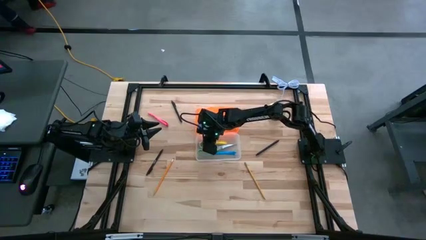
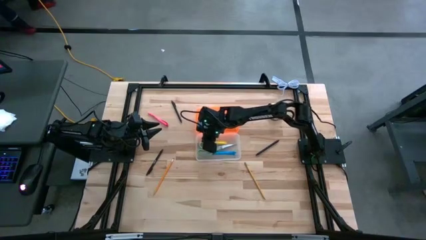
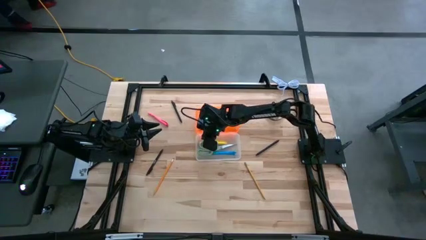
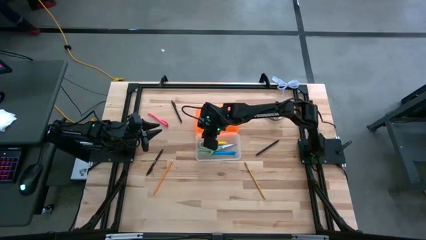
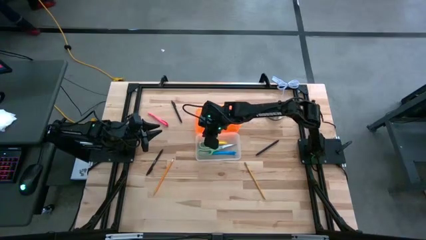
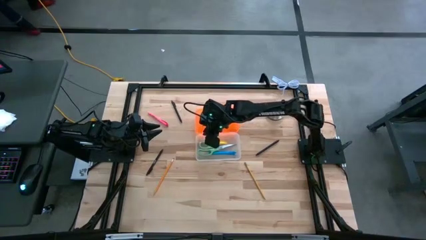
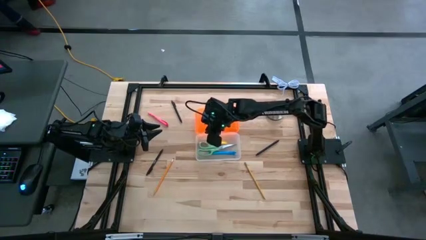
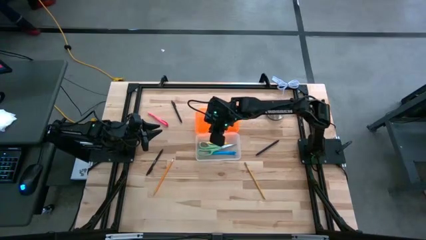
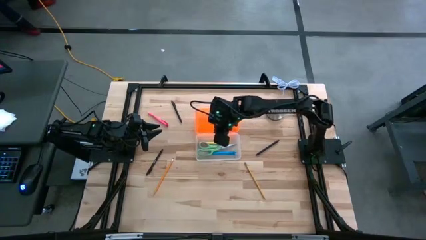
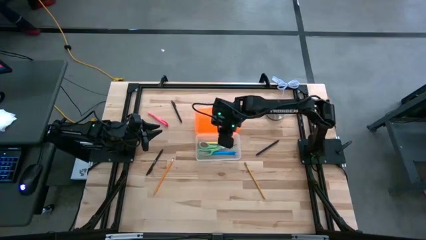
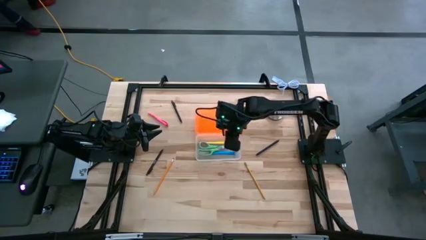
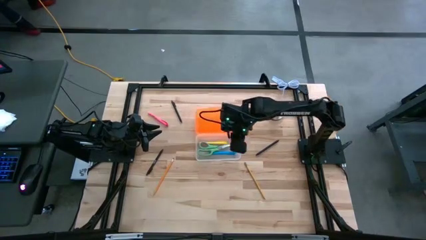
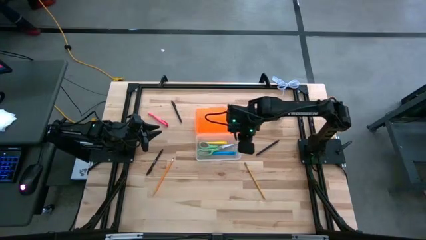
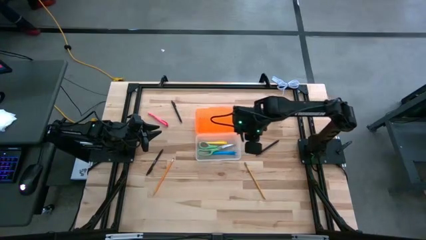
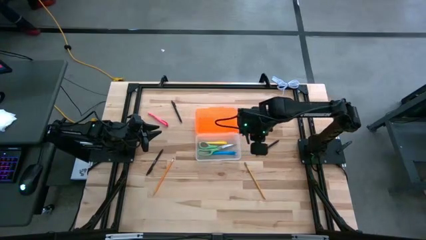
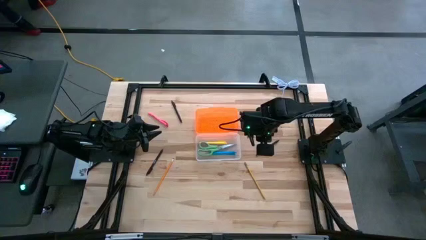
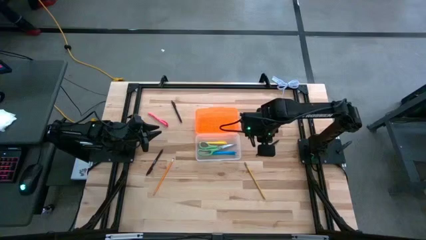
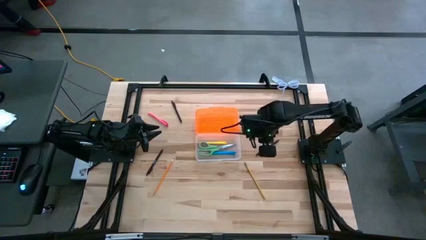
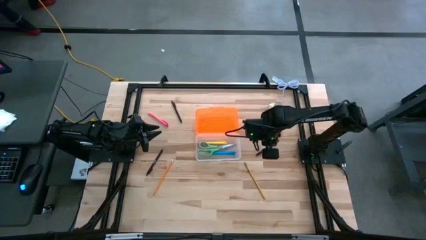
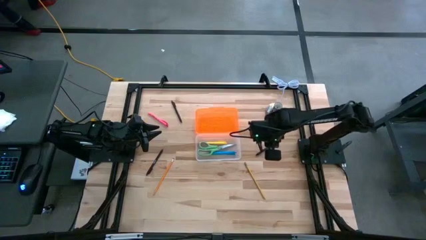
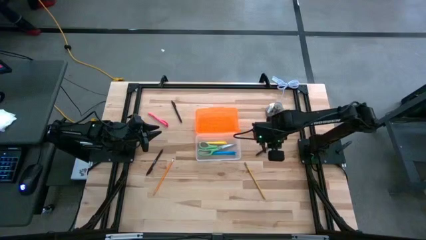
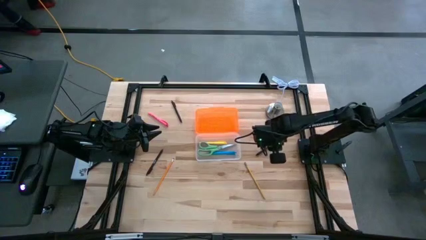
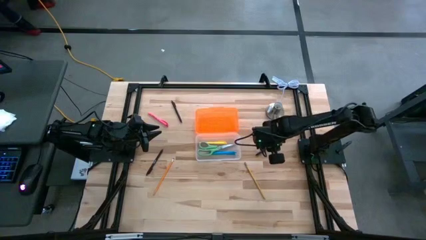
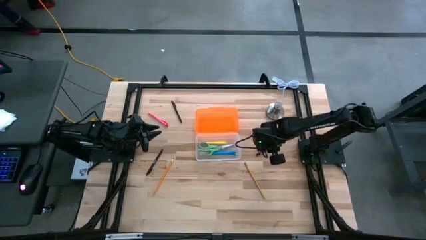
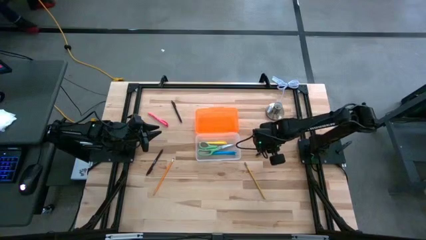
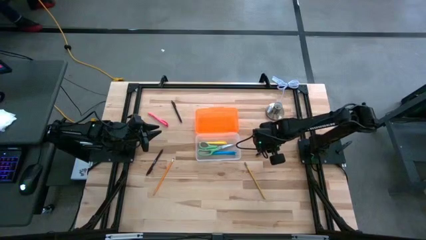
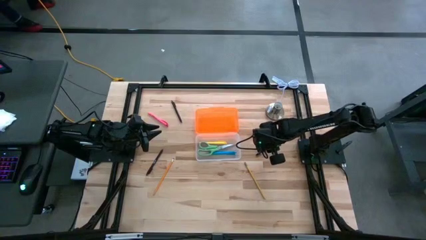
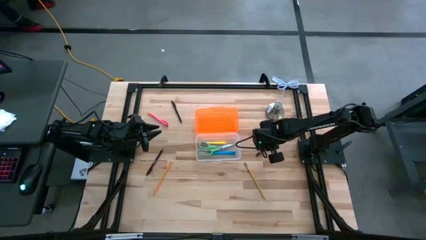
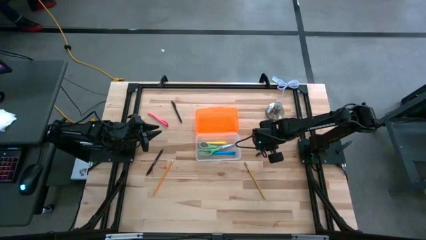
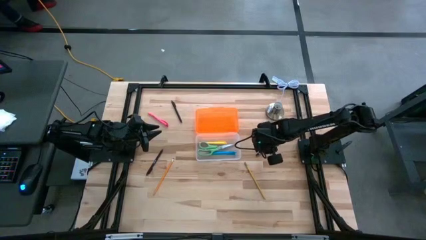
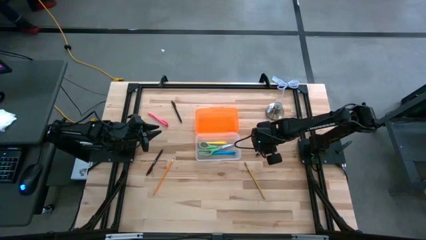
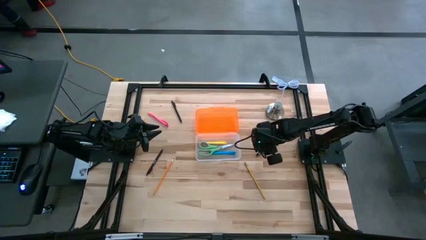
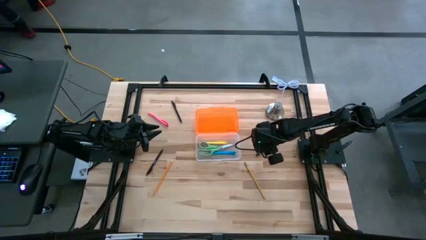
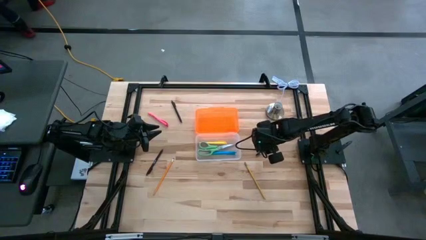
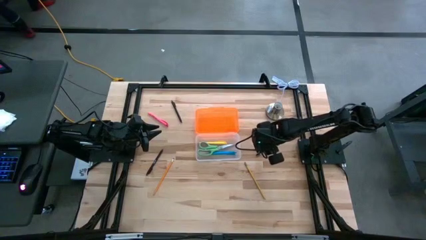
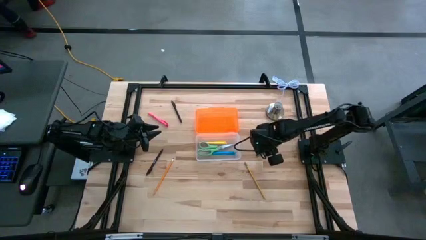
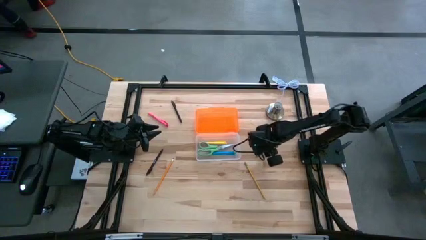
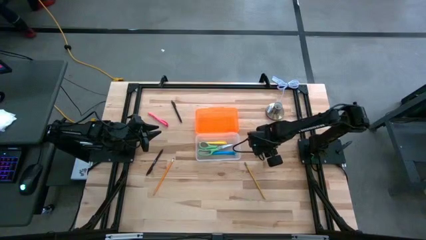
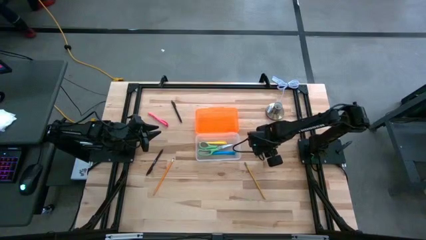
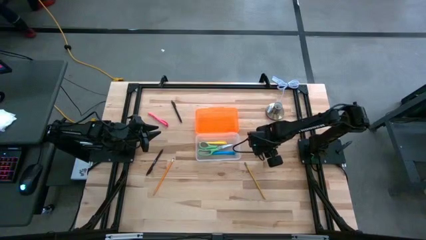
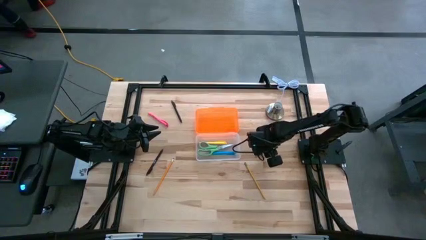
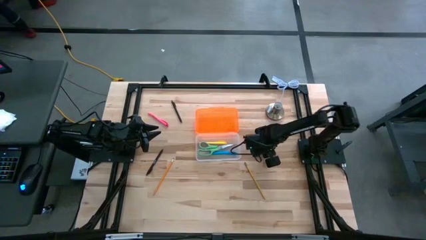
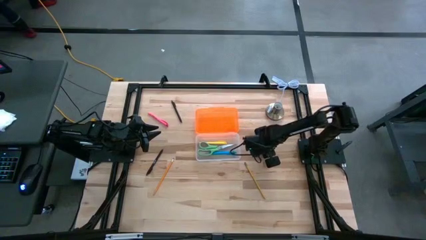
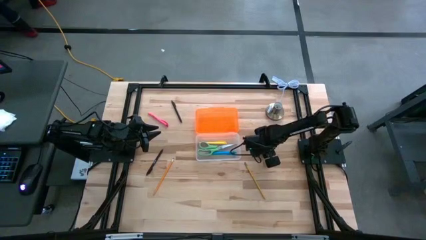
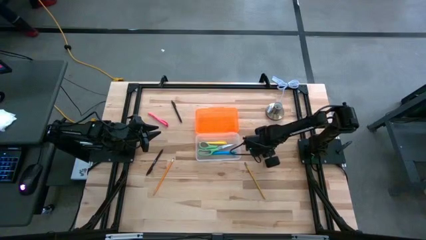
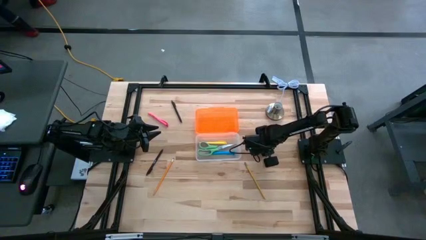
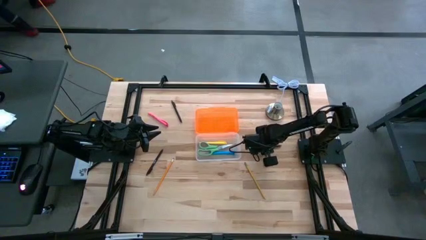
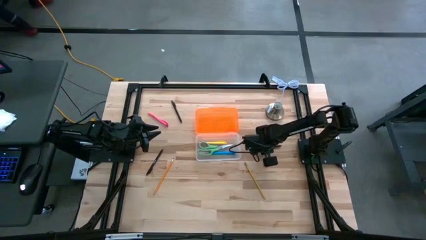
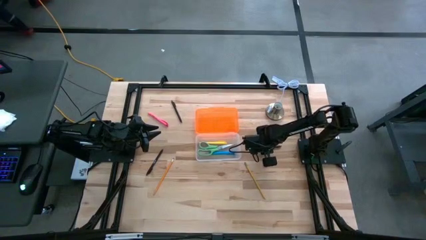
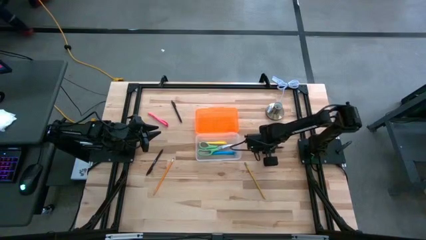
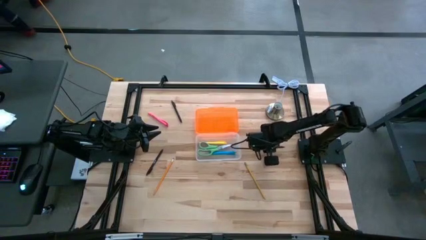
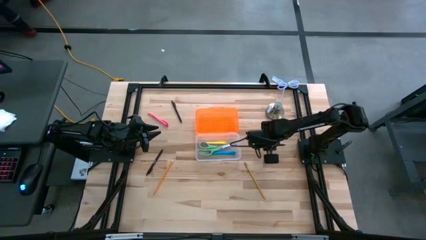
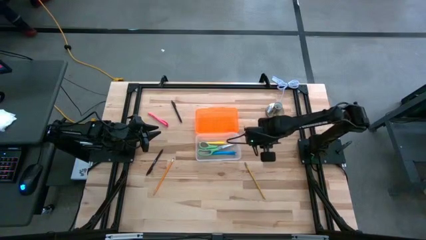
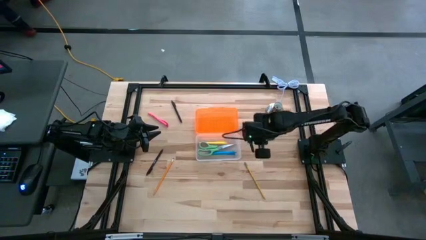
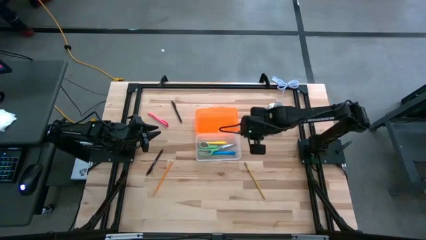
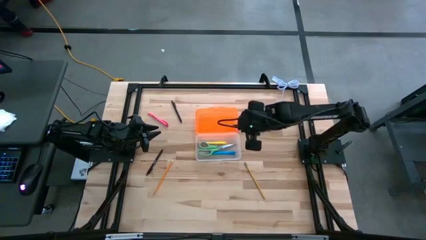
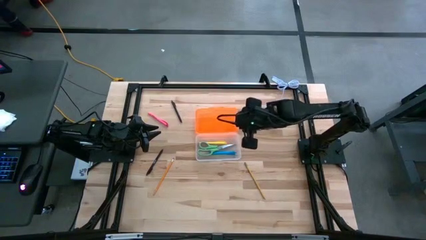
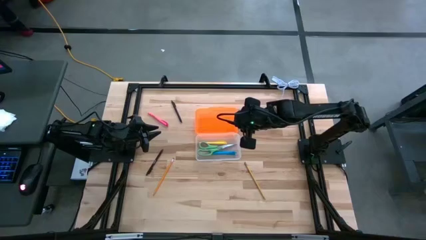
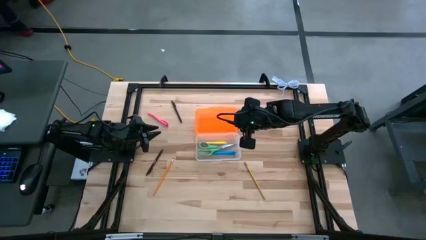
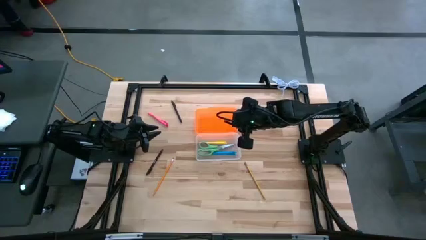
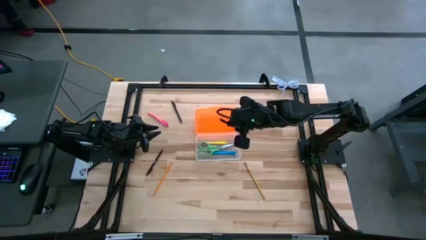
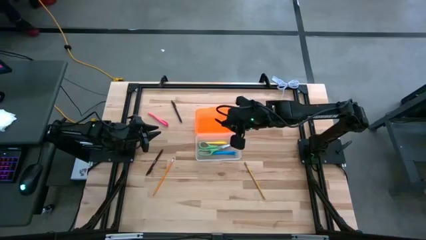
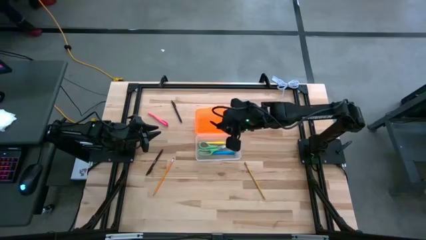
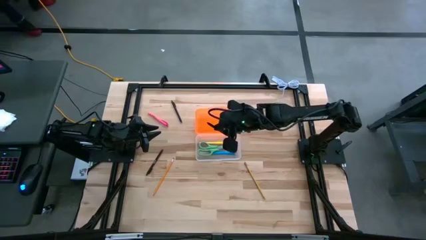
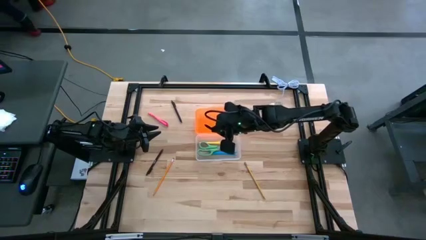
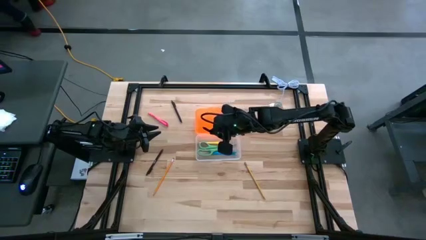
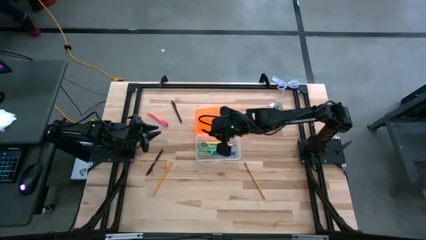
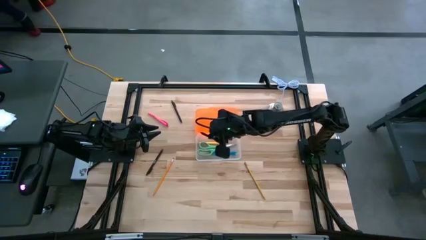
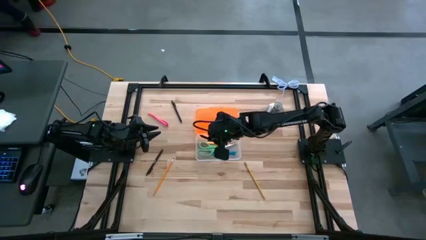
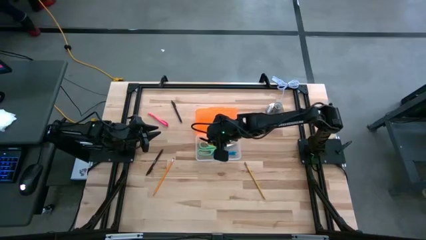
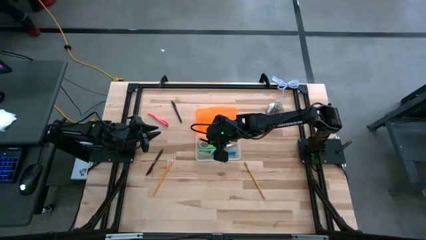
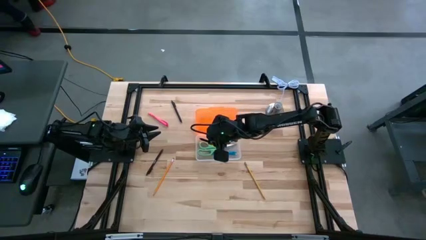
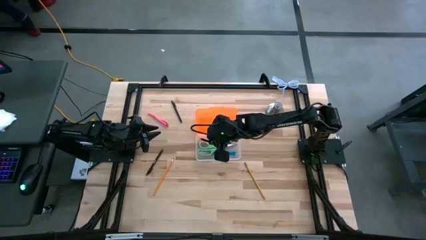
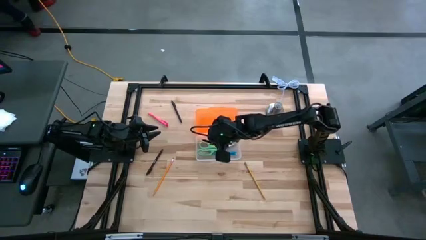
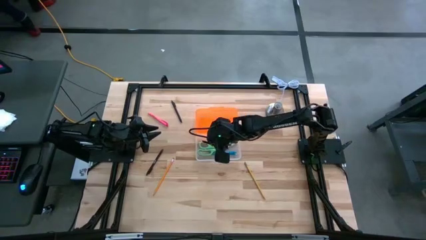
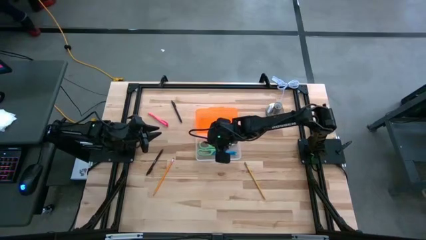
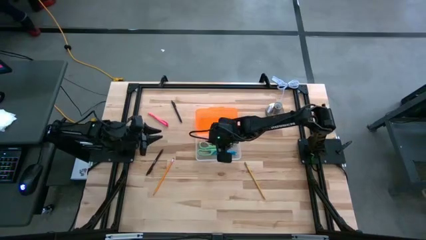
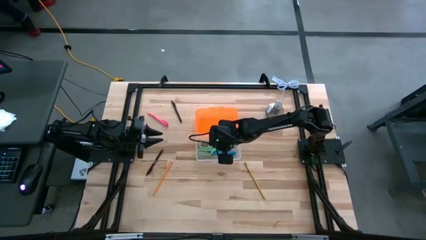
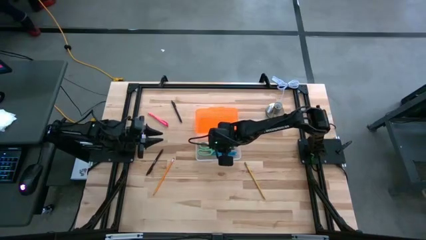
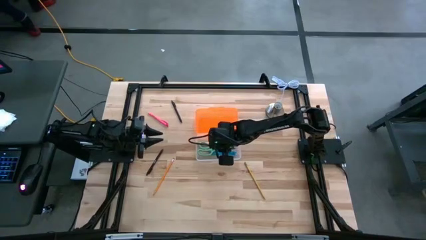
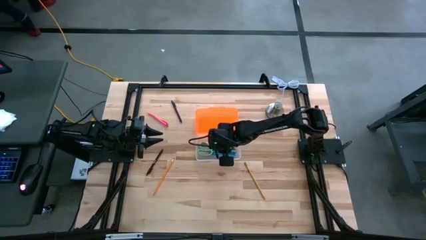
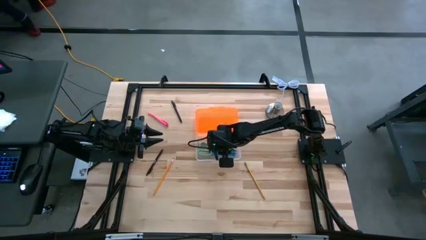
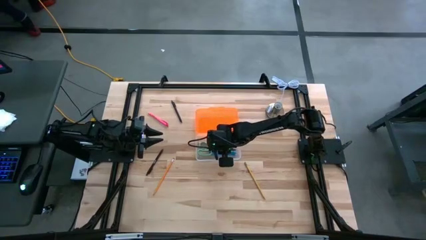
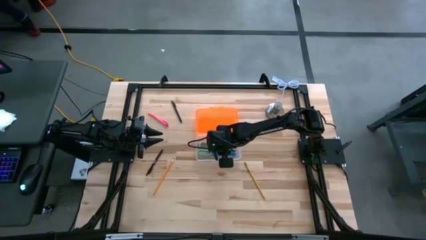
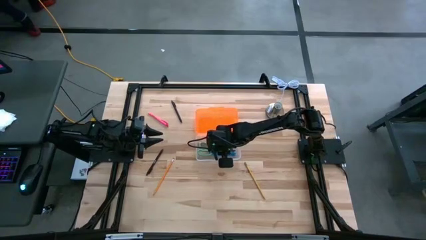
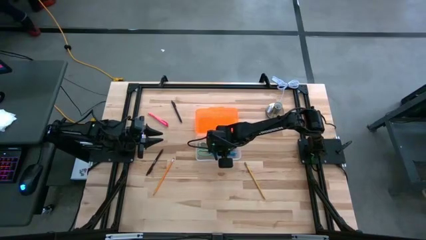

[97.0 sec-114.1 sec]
Task: Pick & place school supplies into a supply box
Put the middle black pen into the orange supply box
